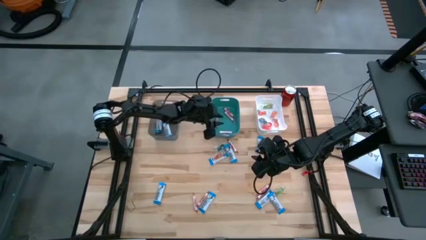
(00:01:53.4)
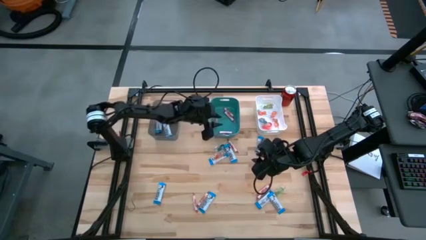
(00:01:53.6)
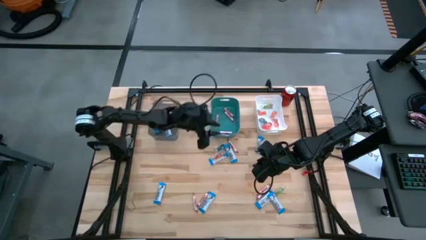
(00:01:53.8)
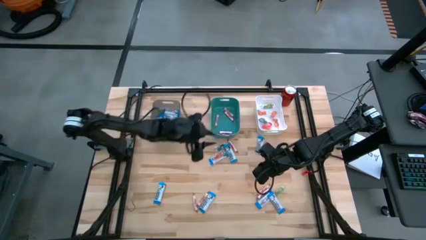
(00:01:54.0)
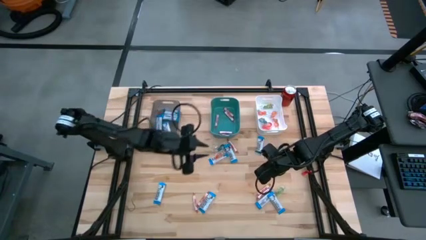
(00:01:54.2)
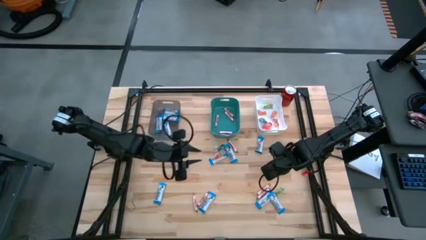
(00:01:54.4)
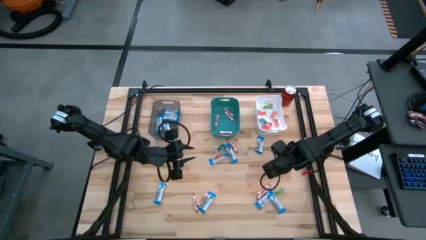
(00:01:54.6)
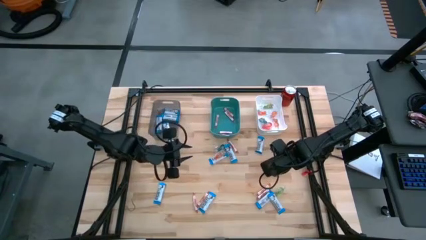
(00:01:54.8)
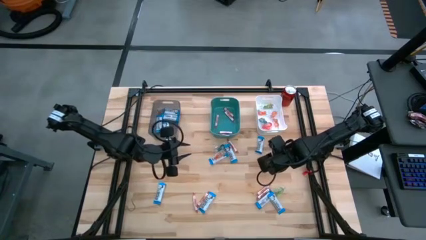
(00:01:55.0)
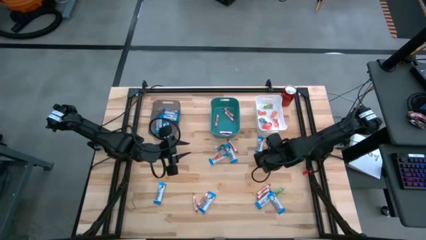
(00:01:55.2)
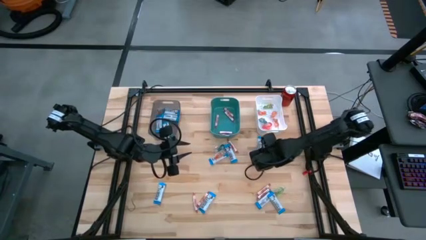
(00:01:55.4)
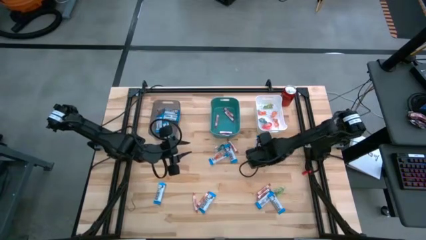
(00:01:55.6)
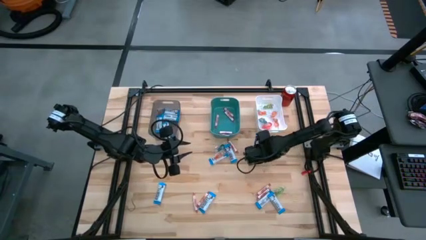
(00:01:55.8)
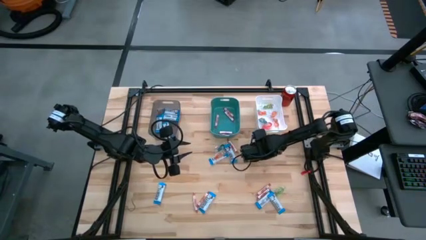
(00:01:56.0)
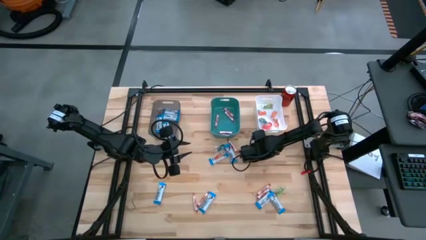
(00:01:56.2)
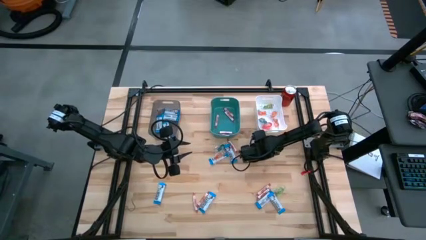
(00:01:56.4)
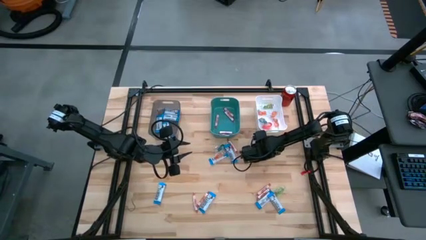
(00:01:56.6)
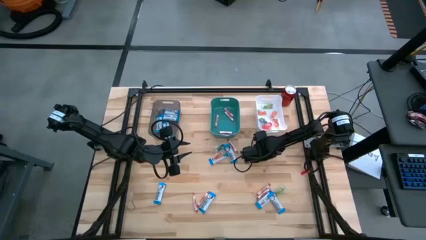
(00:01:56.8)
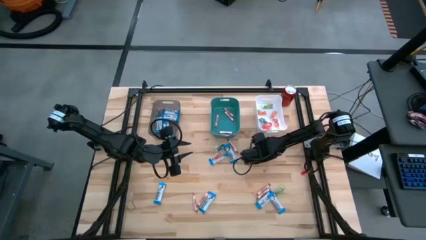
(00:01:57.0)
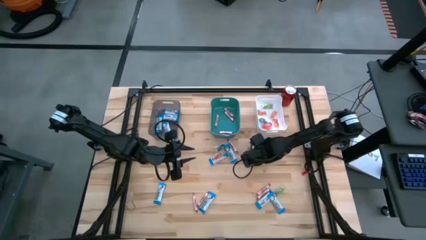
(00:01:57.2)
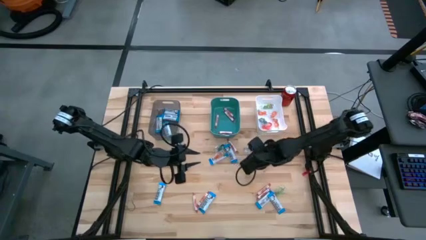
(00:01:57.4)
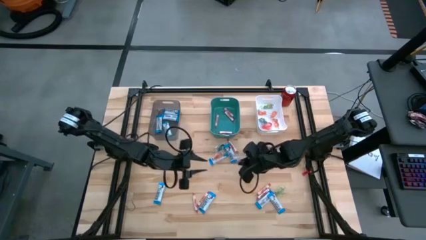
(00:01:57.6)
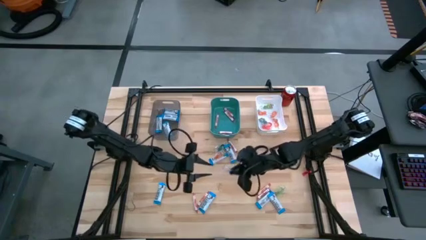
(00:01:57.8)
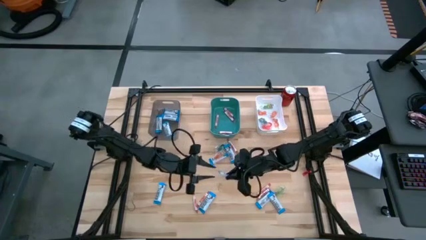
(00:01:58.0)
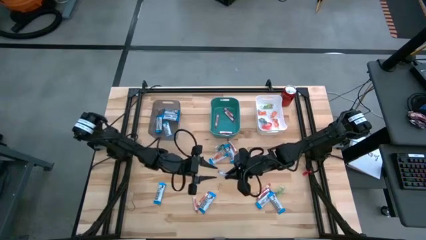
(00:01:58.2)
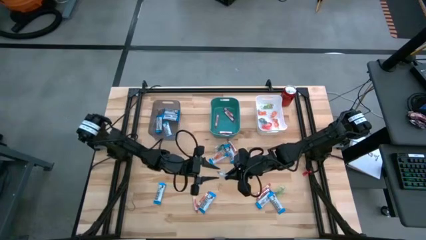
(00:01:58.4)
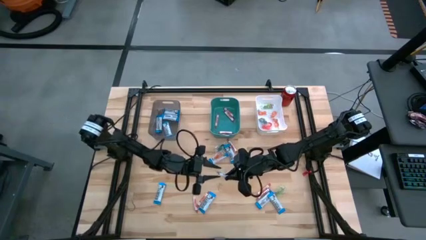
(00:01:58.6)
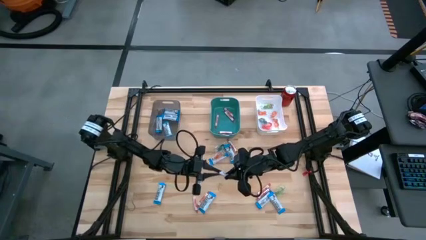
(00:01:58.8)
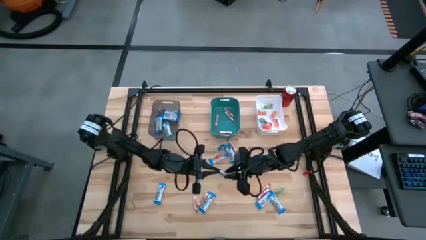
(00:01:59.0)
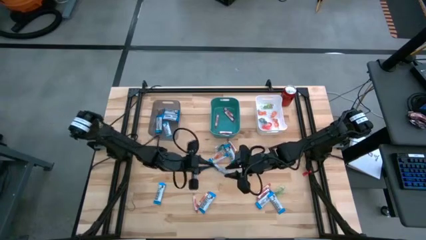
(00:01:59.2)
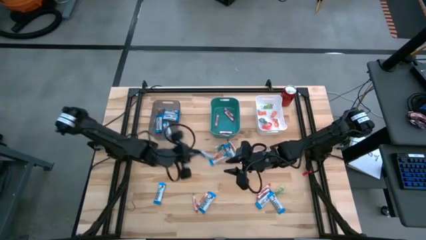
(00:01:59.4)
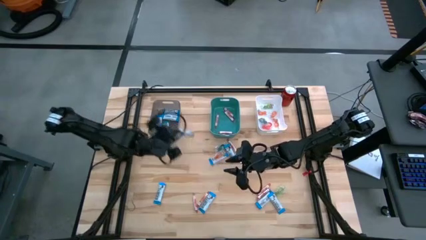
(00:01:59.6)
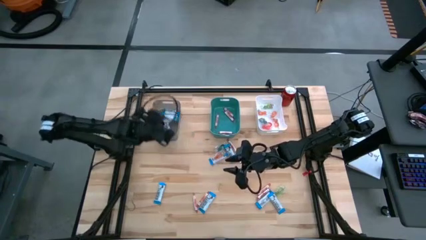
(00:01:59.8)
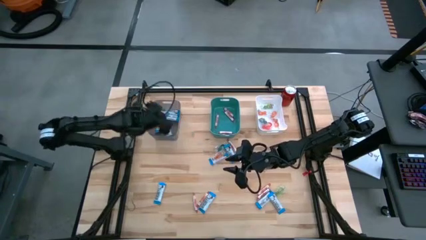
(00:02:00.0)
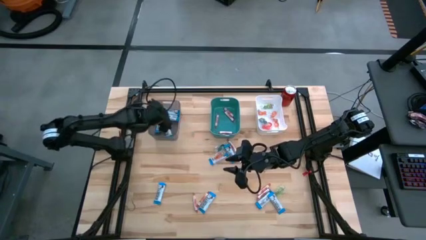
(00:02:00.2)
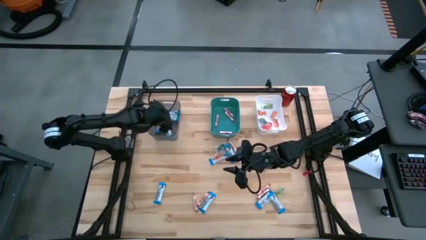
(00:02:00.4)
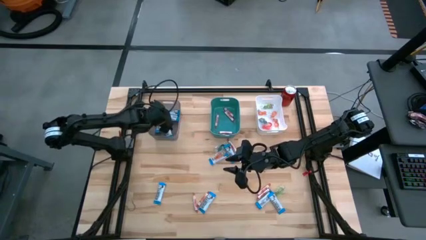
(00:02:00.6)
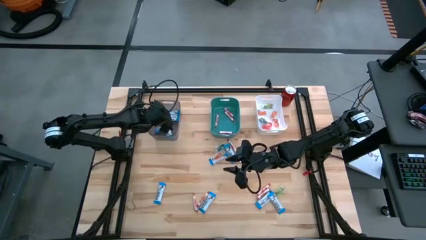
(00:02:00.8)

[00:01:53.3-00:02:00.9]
Task: Sort candy
Put the white chocolate into the black bin

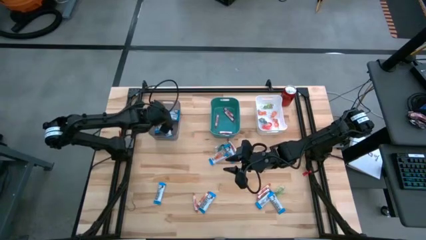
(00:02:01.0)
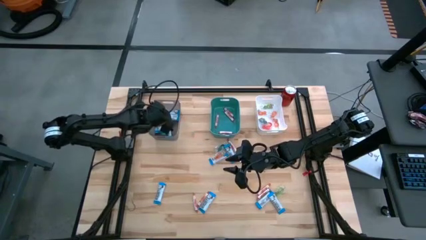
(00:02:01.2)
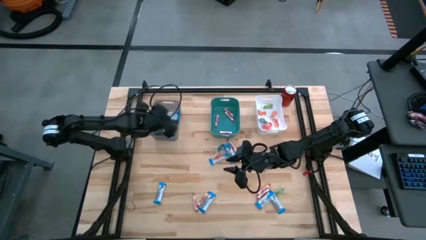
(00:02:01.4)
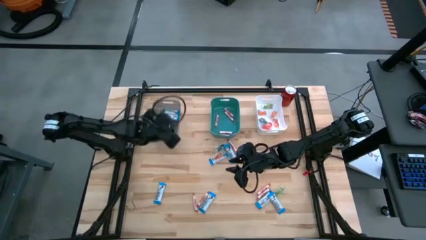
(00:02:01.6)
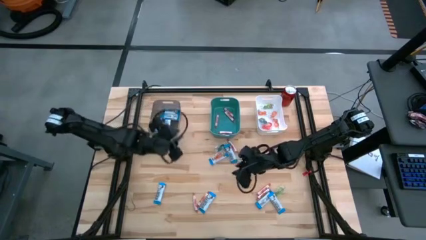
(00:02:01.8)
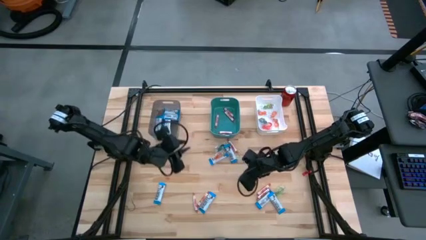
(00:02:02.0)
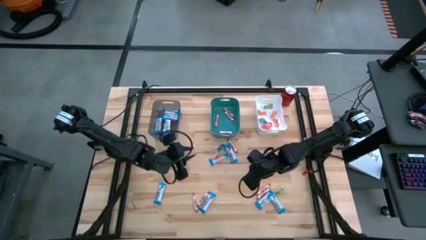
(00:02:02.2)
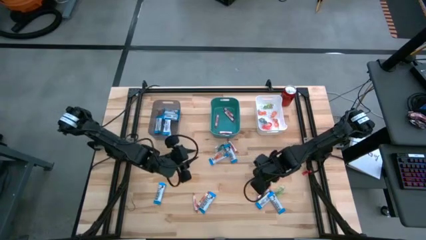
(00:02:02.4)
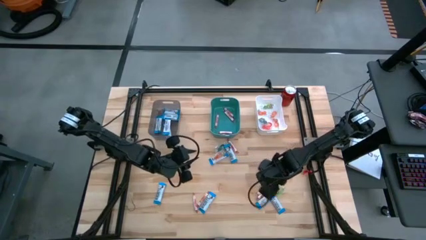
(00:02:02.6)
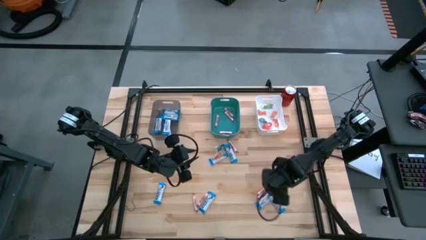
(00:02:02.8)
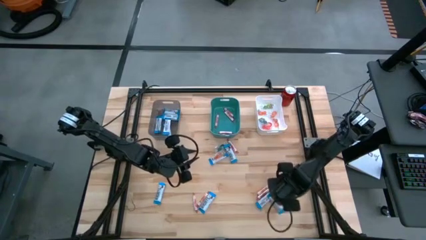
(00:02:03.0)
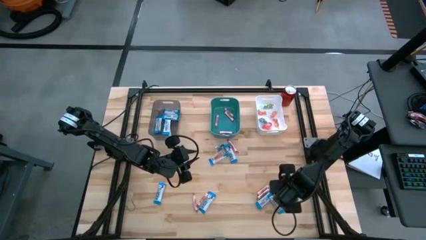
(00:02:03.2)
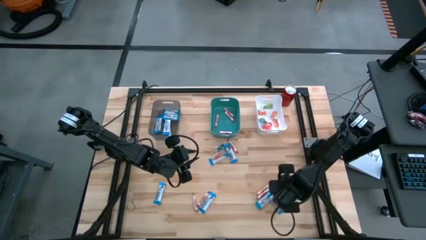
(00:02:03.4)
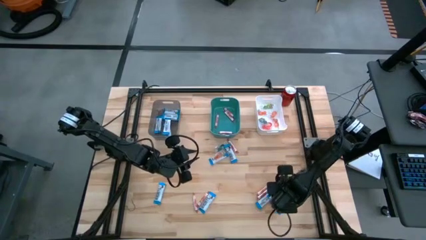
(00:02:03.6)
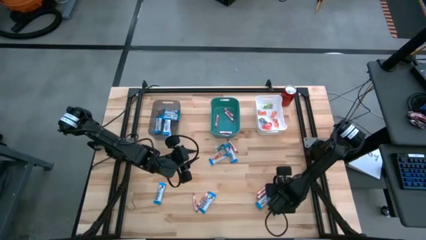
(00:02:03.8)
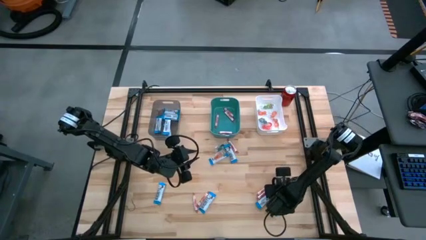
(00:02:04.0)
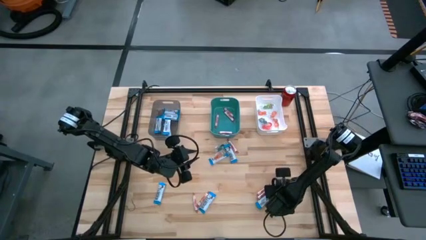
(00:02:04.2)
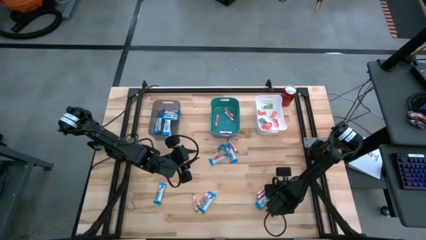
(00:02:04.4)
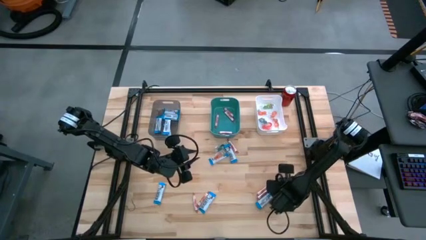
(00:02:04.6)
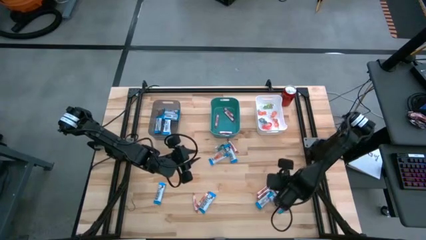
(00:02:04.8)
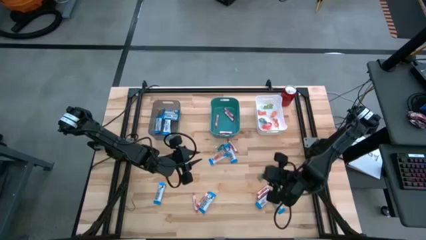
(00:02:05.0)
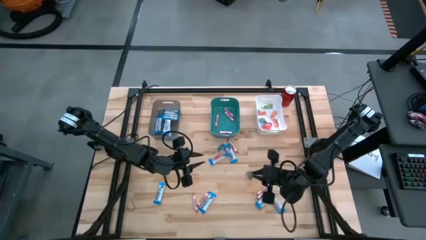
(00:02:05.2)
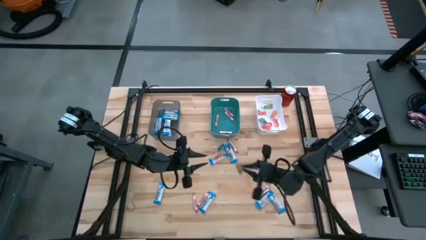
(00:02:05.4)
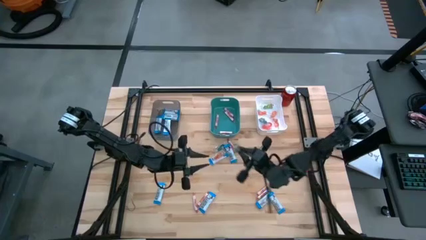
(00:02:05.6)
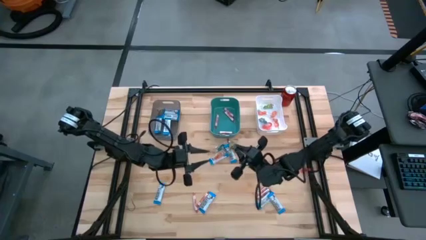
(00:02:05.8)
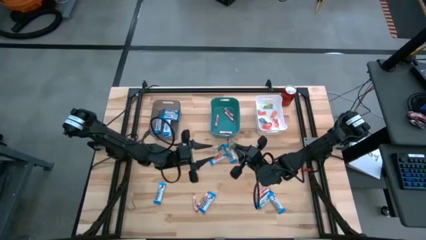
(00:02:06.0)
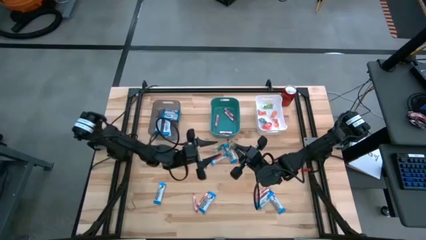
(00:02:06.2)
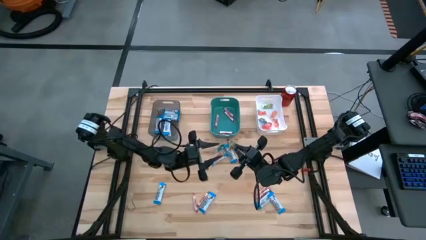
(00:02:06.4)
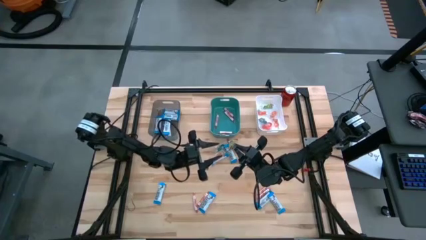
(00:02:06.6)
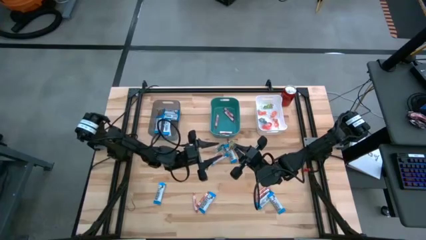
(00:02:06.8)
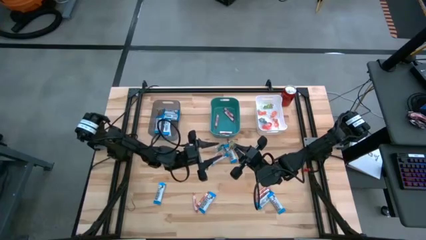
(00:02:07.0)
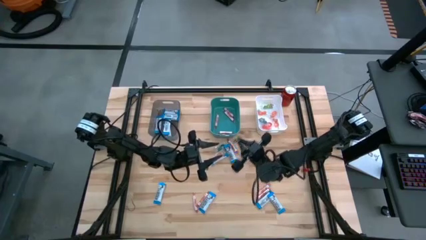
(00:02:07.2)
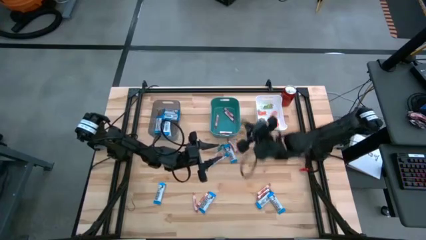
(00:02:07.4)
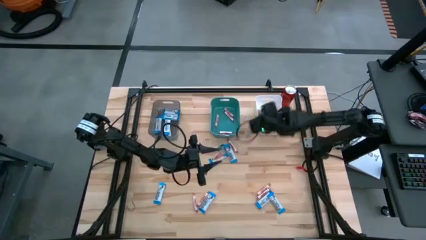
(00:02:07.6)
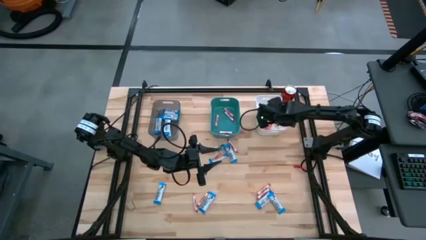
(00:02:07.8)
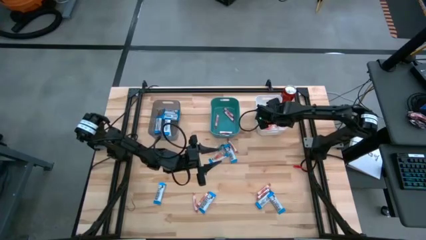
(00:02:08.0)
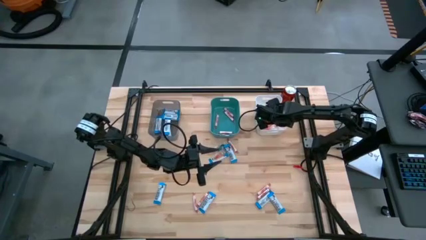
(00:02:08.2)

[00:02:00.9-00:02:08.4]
Put the green gummy into the white bin

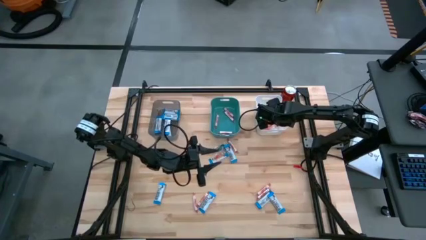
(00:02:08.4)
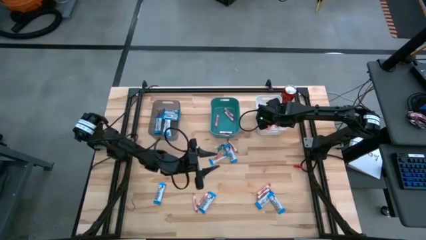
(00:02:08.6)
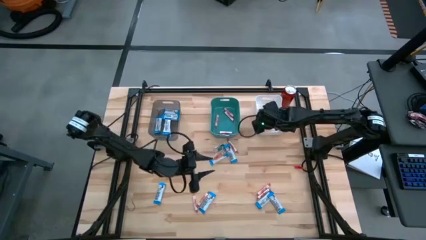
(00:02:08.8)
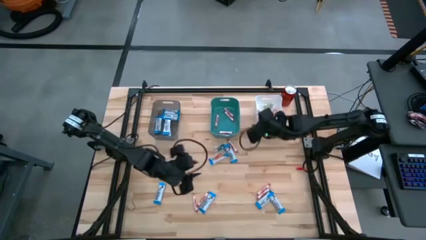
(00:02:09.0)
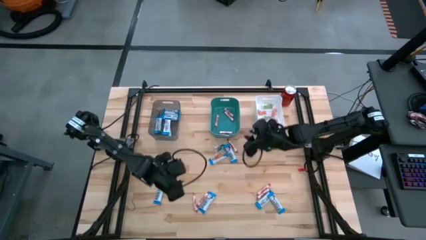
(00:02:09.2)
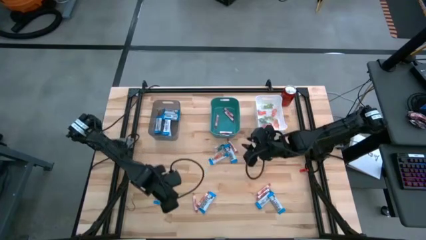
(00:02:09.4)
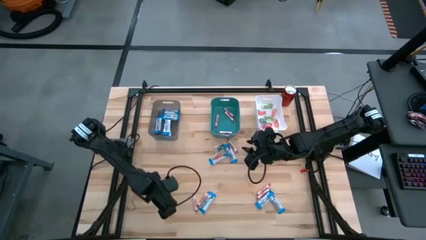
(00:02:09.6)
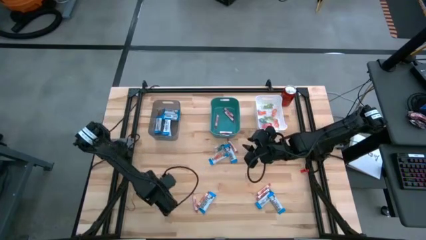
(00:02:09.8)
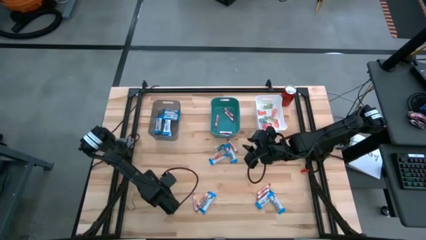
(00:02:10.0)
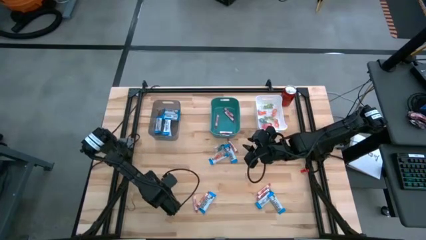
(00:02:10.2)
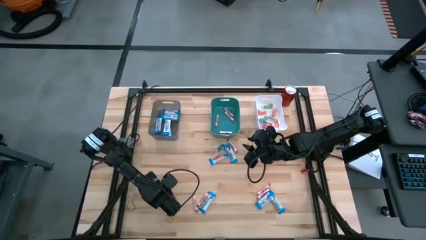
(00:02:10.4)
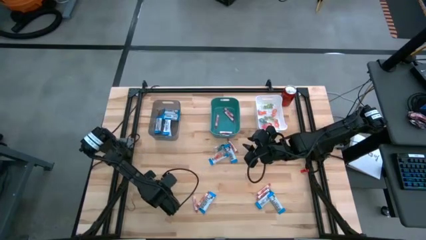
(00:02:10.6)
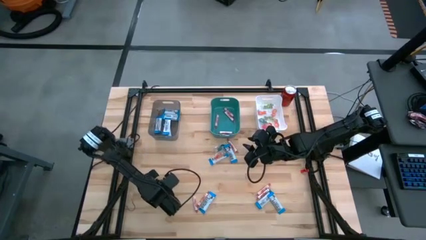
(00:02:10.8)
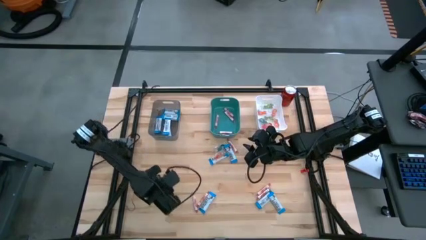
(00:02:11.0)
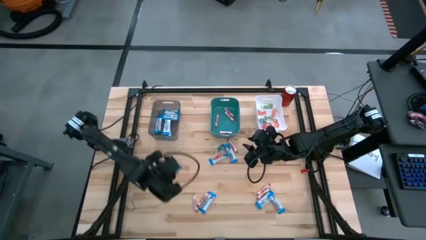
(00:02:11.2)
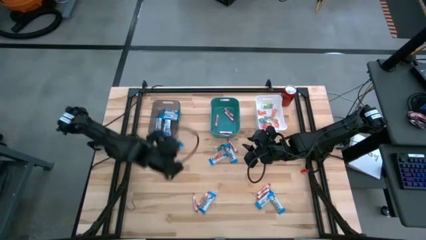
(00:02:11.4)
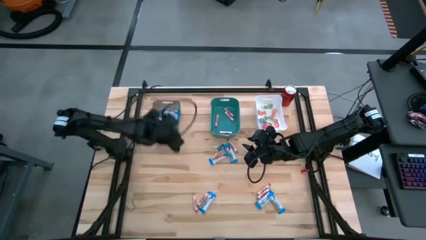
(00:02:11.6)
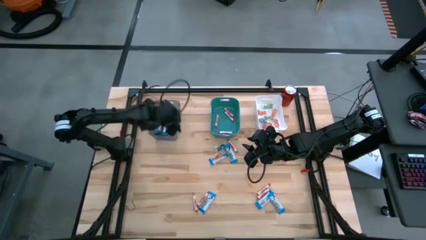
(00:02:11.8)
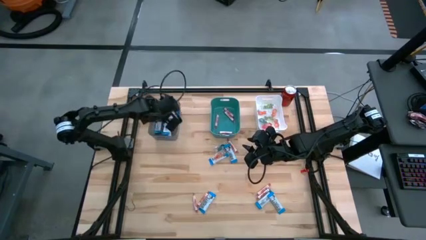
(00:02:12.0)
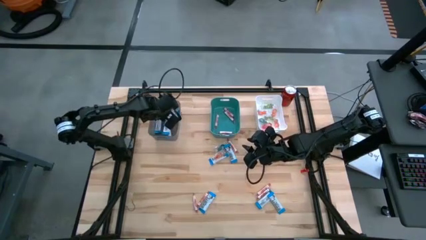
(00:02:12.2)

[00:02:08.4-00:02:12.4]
Put the white chocolate into the black bin
